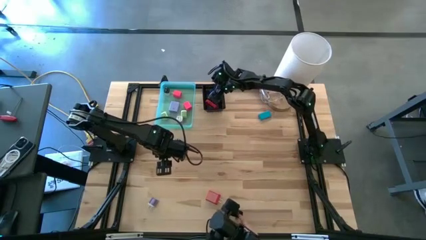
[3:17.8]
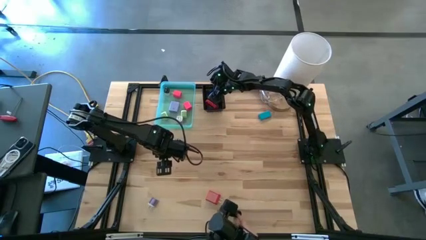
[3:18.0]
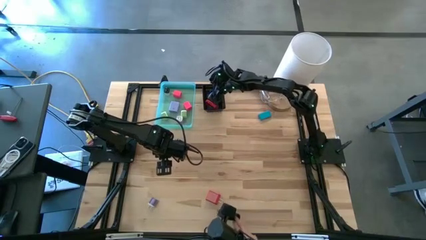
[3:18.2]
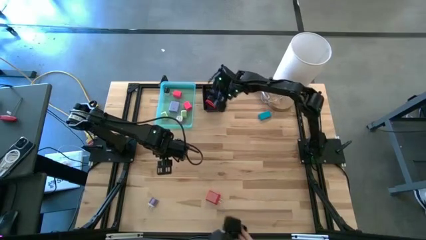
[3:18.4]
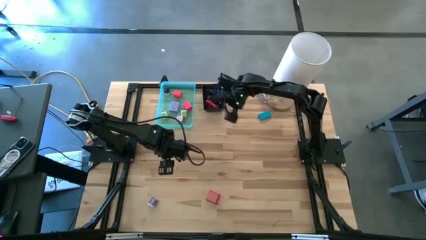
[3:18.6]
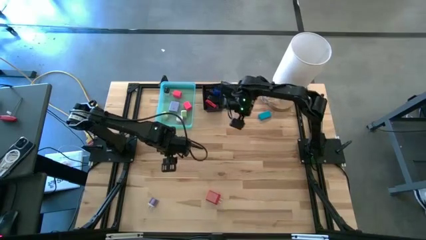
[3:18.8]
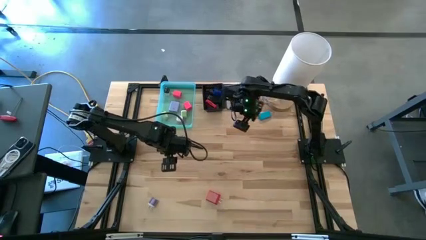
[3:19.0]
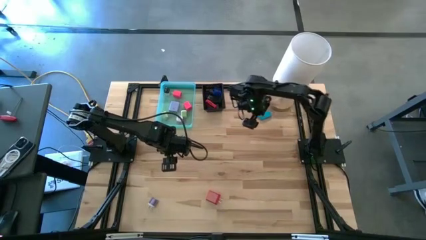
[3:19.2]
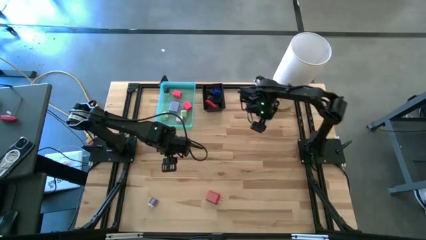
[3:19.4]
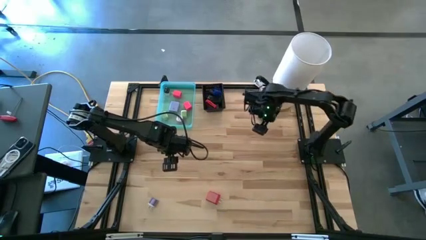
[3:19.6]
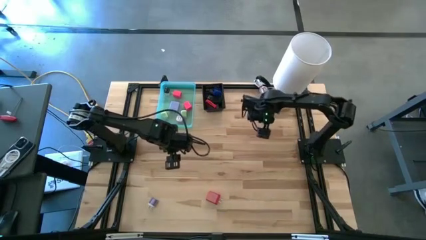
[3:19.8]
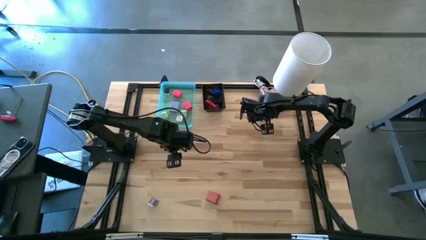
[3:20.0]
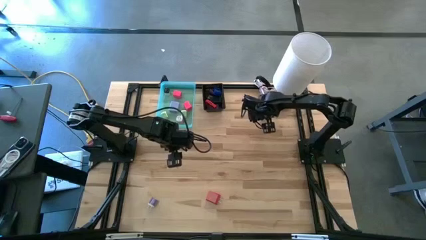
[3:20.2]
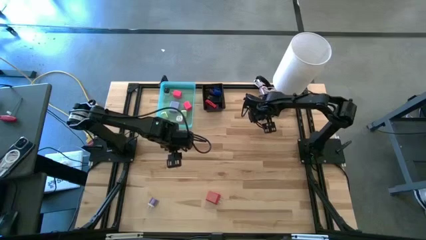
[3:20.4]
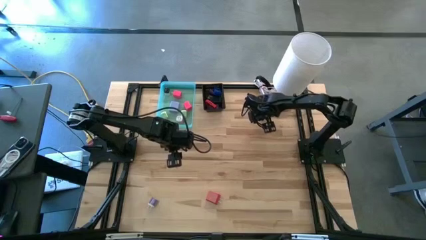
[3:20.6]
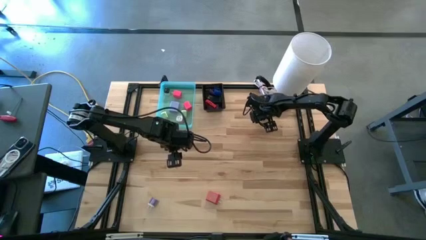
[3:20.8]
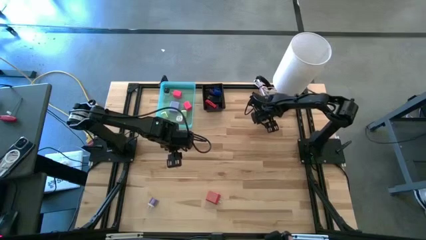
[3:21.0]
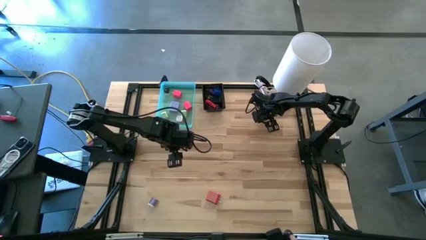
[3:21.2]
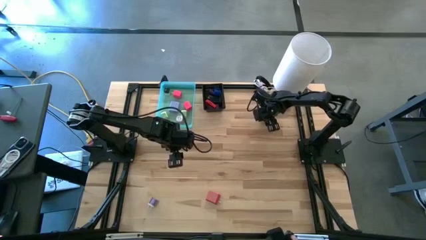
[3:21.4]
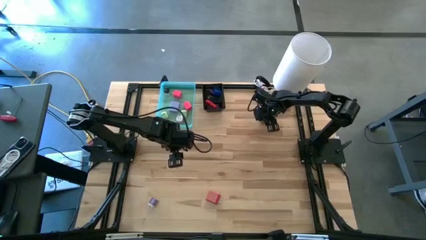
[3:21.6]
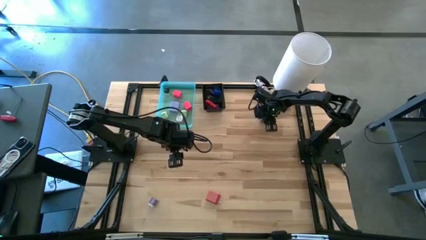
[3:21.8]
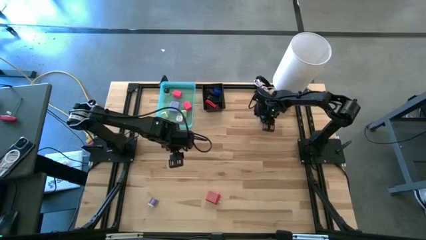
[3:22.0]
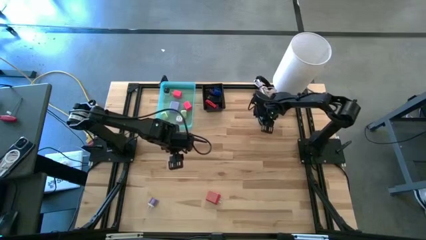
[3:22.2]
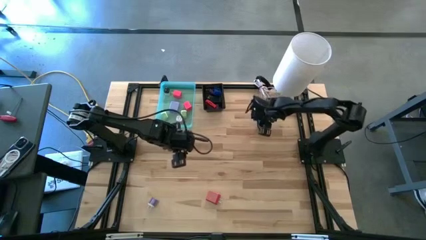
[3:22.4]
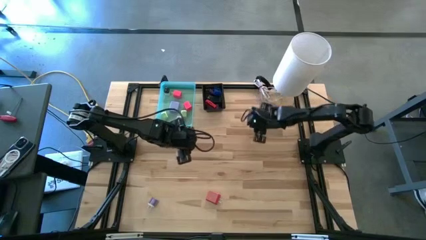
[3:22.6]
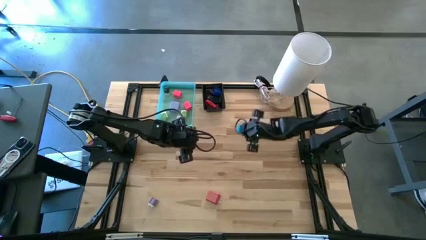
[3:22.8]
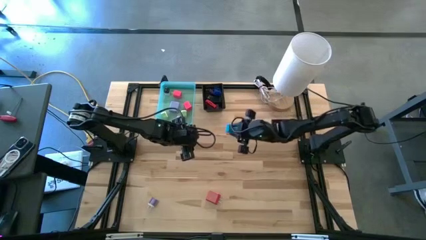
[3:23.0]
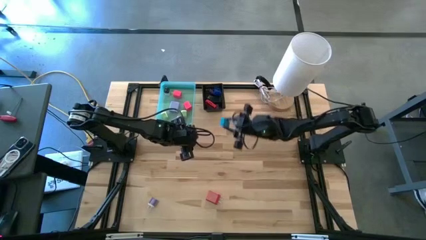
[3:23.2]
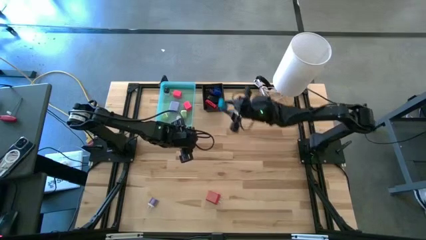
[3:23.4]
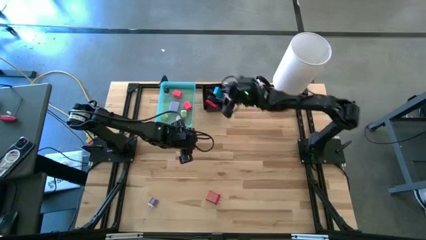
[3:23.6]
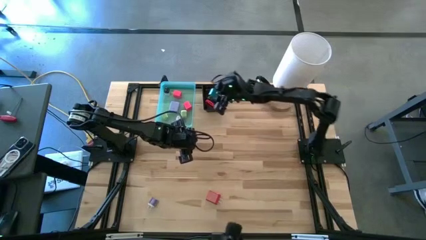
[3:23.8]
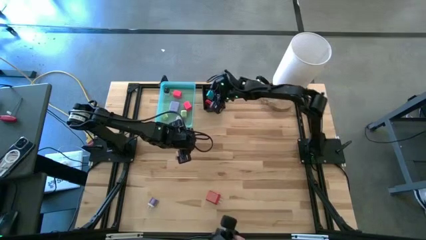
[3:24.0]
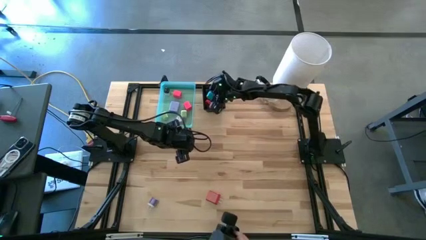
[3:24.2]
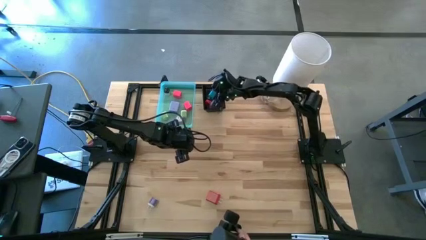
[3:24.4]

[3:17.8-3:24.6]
Task: Pick & Place Office items
Put the light blue timer into the black bin

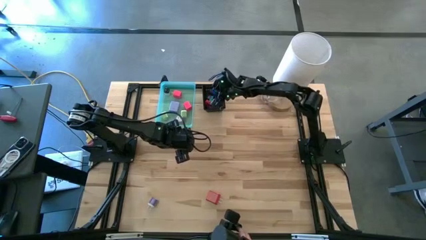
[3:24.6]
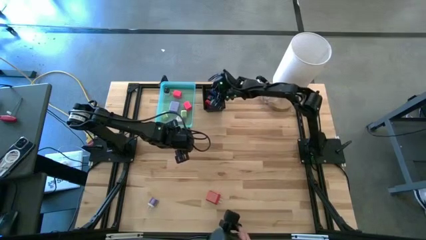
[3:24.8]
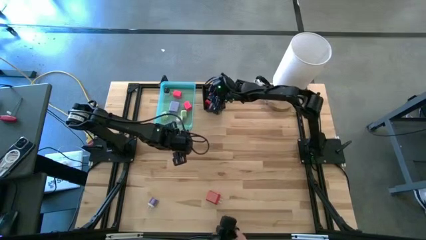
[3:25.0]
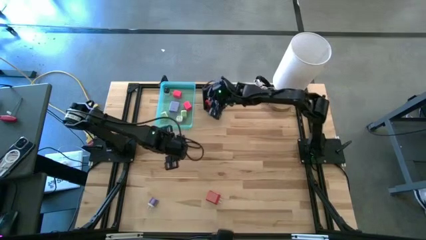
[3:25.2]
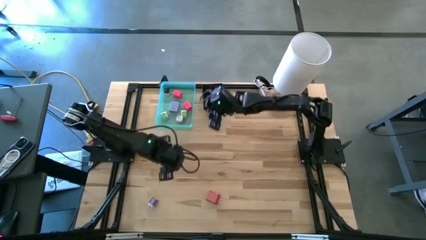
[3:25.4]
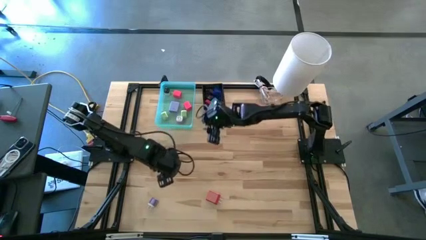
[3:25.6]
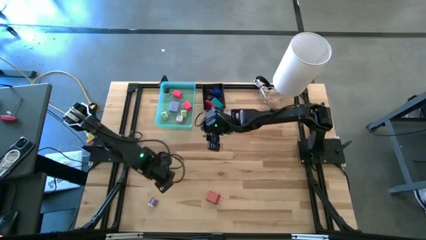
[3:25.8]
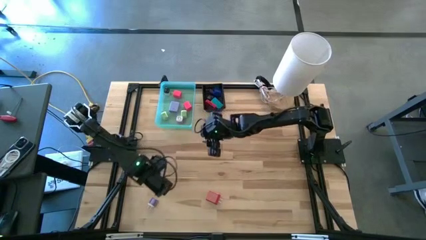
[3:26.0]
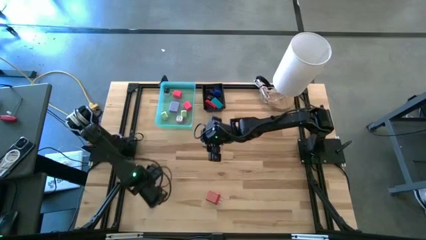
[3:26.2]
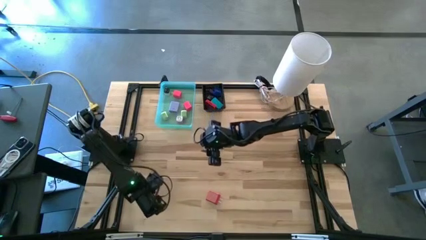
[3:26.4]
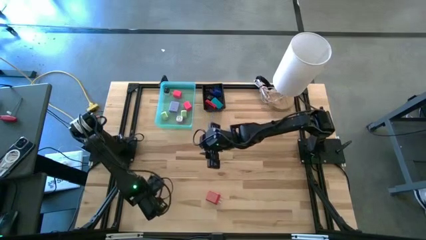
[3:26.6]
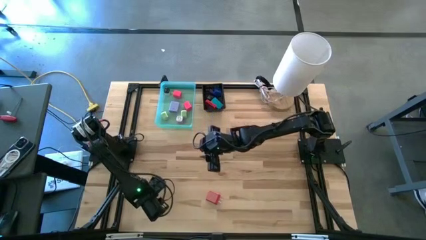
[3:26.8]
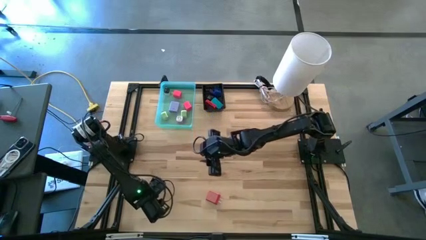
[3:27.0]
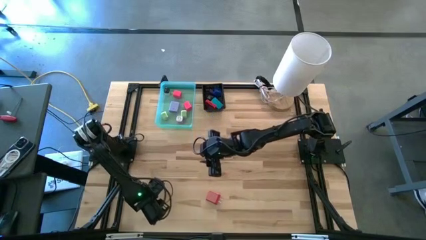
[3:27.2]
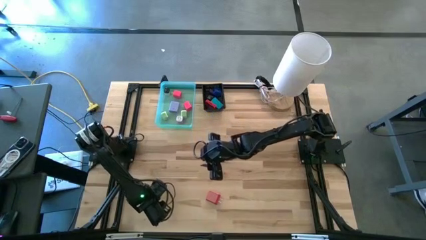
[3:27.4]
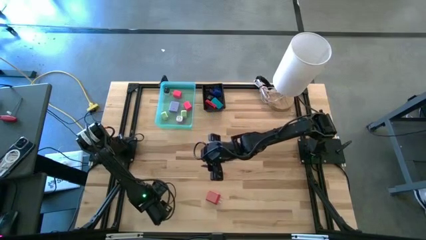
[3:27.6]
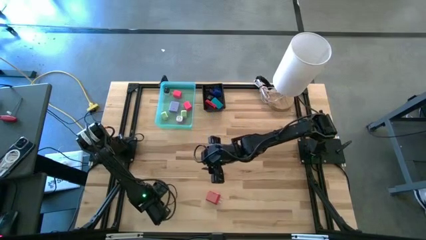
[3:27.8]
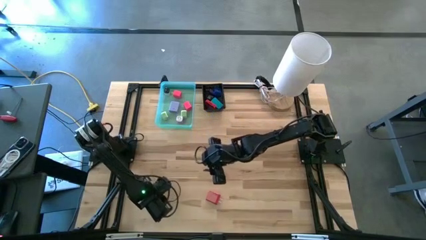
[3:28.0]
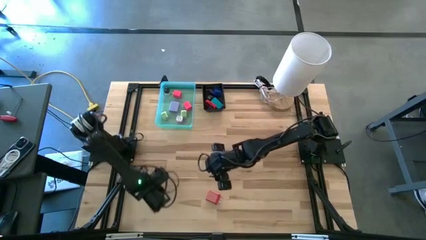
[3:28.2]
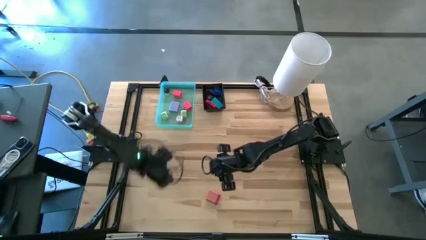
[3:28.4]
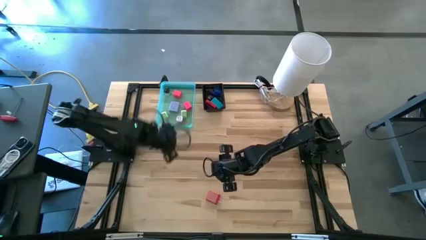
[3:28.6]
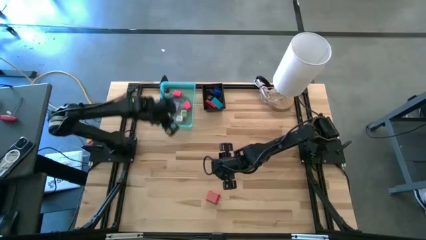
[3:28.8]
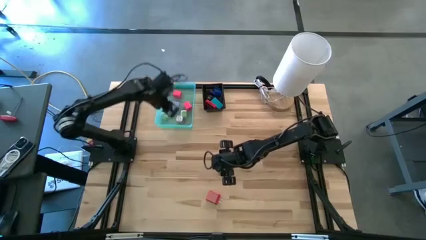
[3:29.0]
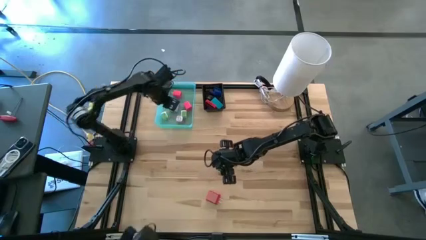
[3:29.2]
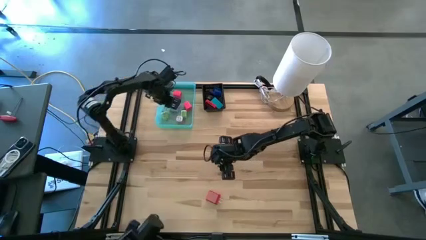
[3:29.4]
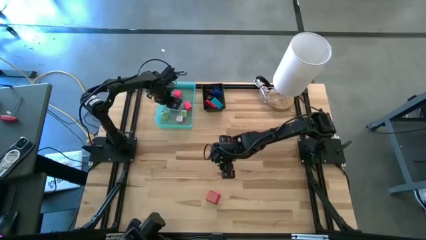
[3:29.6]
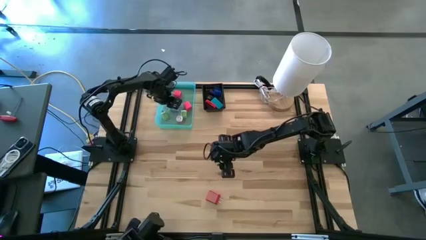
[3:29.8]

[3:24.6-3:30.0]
Put the purple charger adapter into the green bin

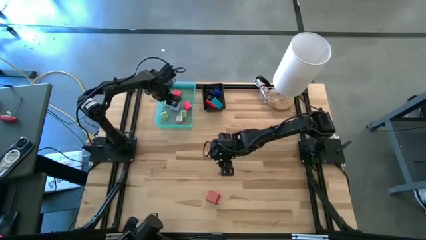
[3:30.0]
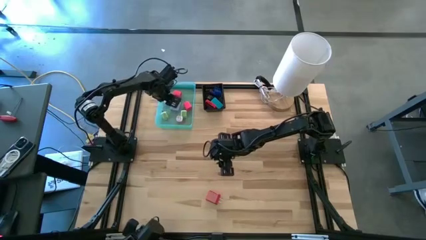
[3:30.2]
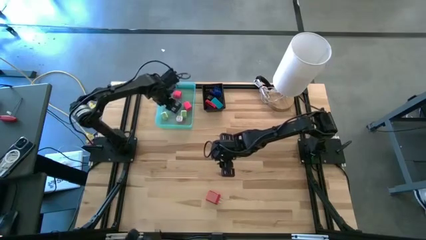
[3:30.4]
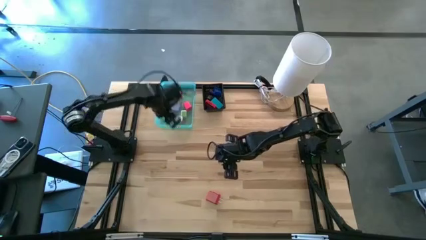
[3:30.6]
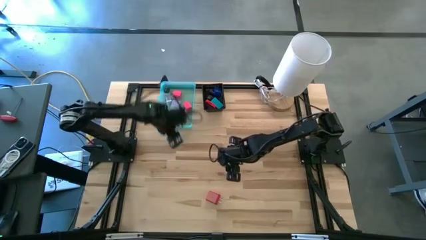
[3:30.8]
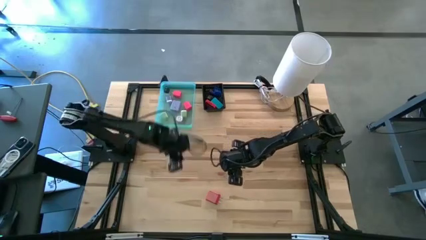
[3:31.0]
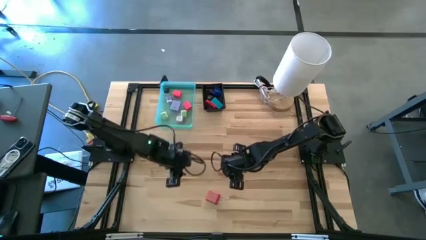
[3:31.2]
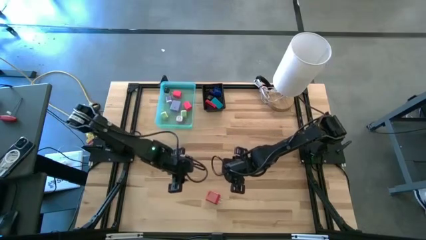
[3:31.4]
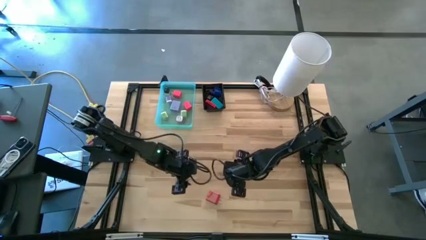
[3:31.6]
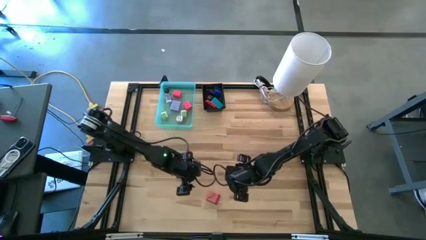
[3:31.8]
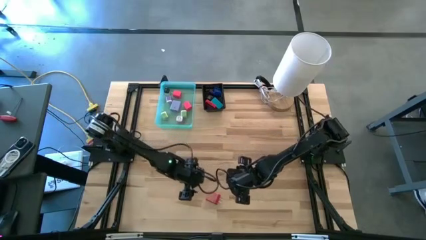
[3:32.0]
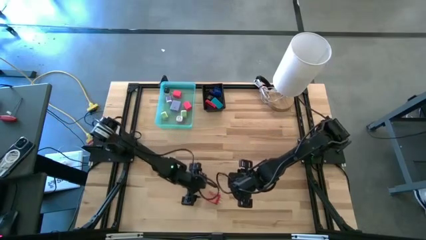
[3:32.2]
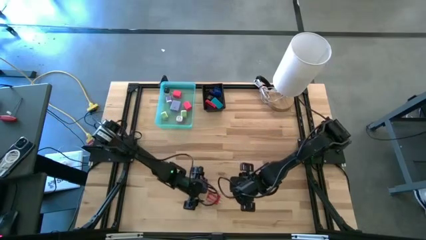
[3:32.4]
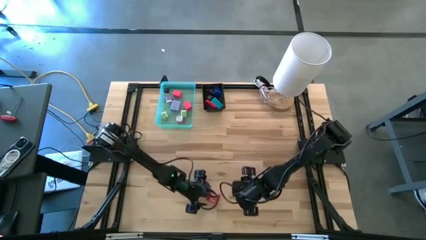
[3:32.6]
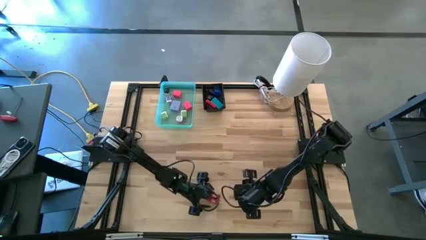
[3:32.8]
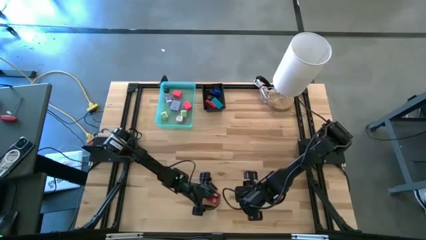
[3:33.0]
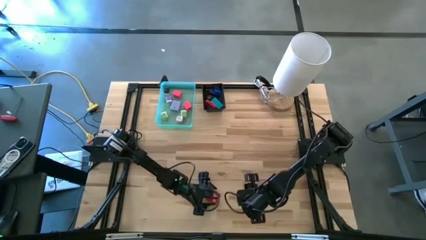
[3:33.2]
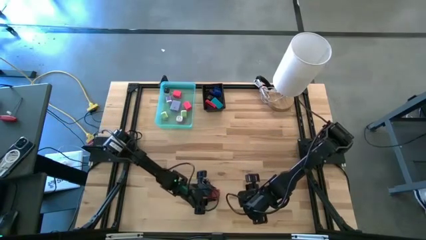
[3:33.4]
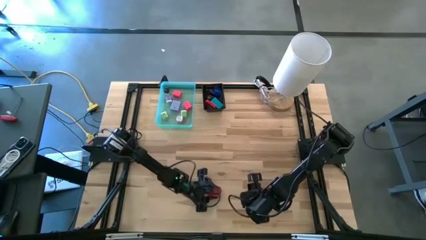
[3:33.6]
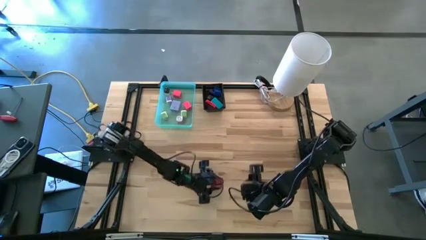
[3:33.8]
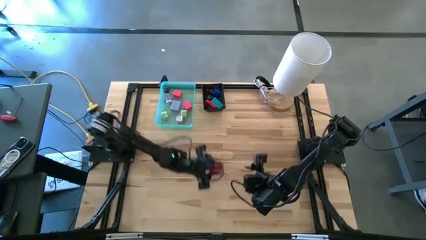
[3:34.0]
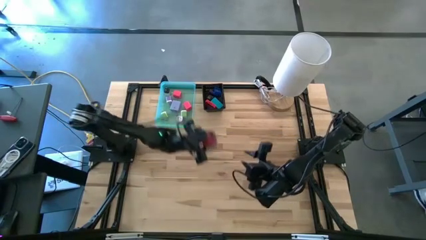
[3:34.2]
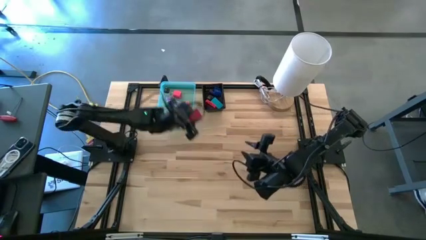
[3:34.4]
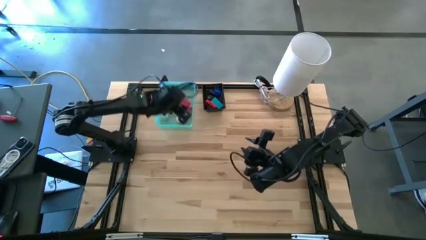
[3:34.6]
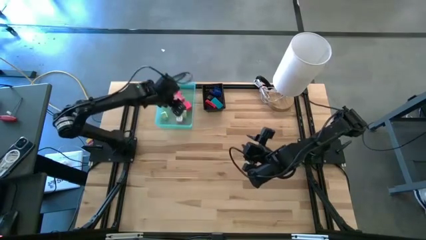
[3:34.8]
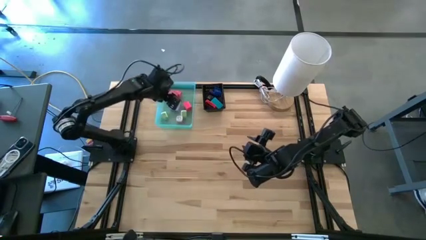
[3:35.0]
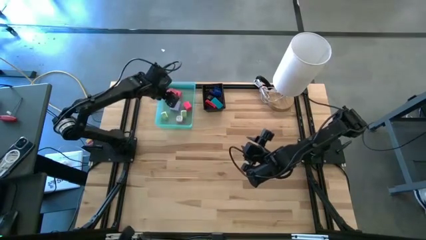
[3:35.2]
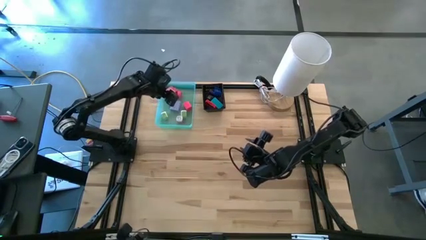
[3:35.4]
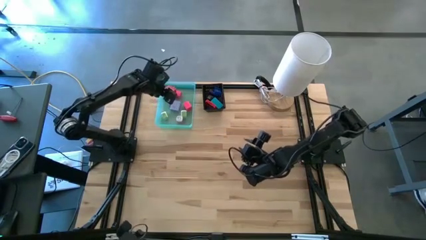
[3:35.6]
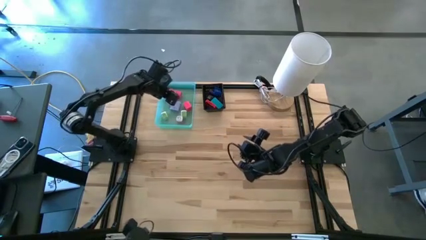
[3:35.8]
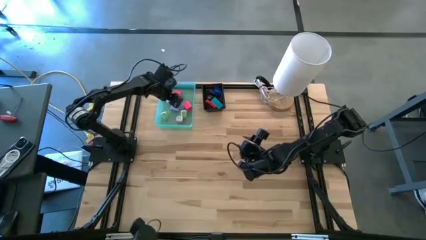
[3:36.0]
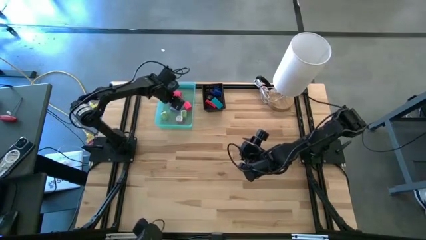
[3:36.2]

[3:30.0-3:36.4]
Put the red charger adapter into the green bin
